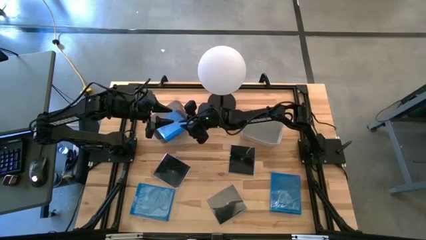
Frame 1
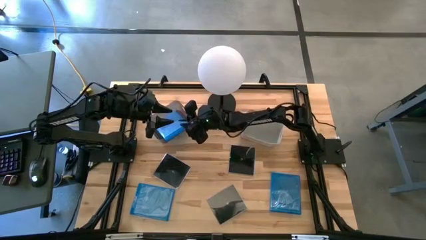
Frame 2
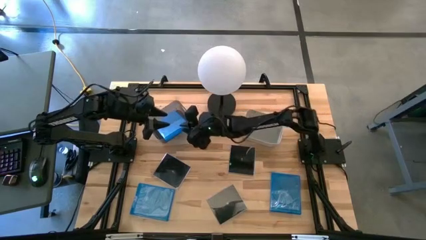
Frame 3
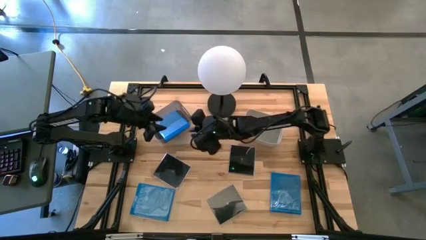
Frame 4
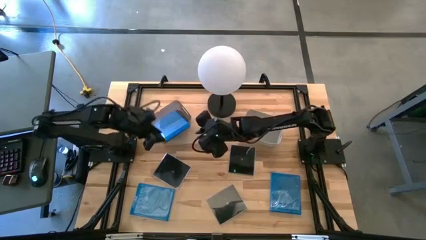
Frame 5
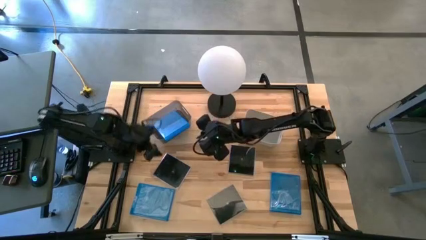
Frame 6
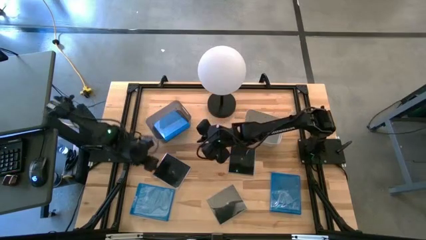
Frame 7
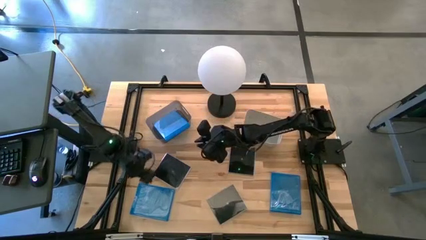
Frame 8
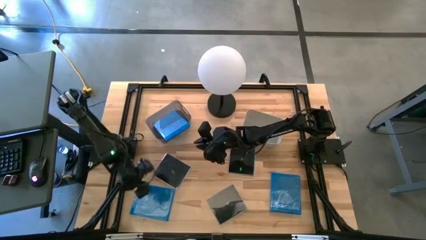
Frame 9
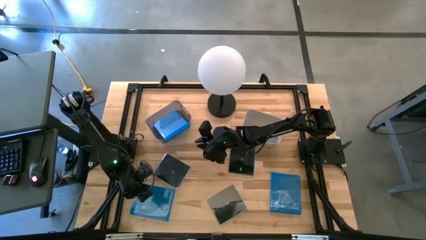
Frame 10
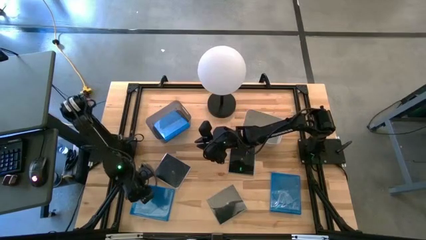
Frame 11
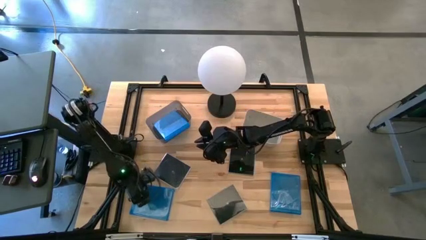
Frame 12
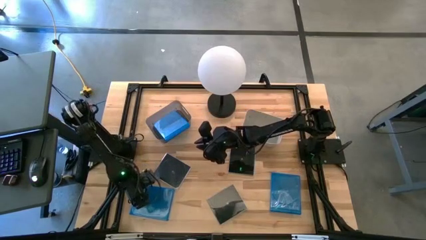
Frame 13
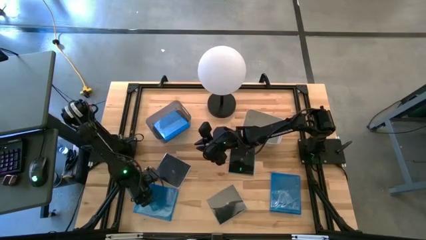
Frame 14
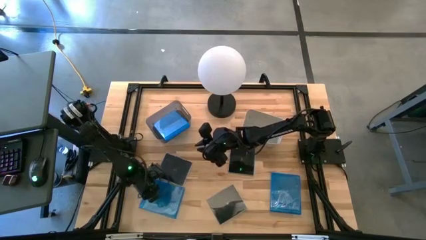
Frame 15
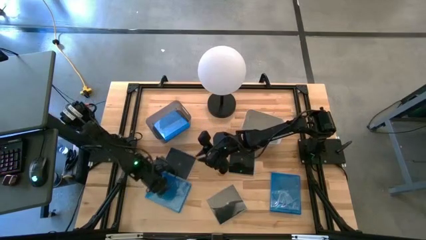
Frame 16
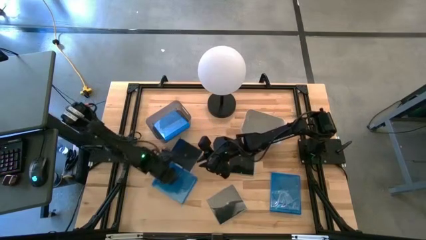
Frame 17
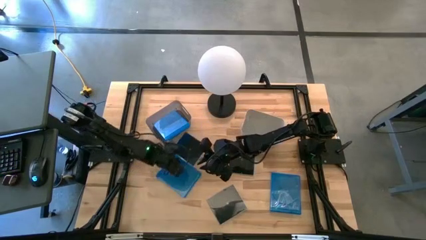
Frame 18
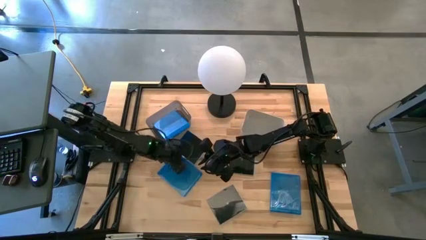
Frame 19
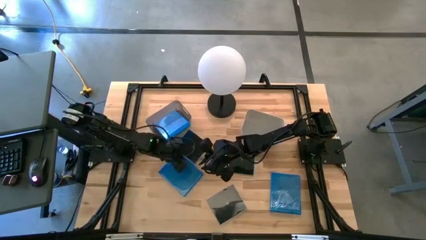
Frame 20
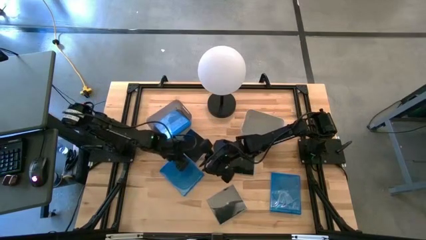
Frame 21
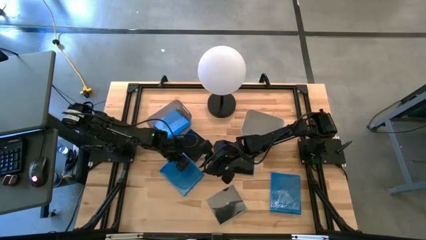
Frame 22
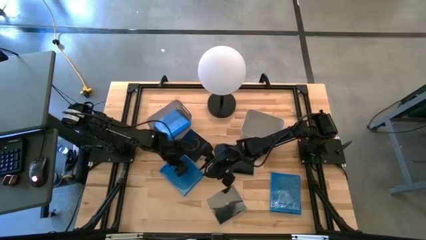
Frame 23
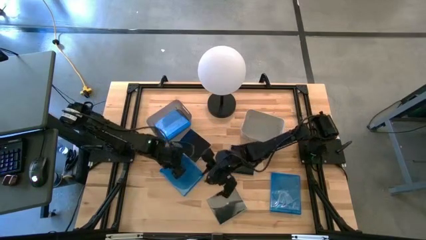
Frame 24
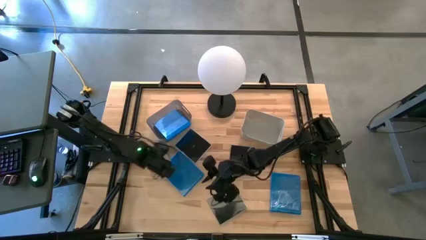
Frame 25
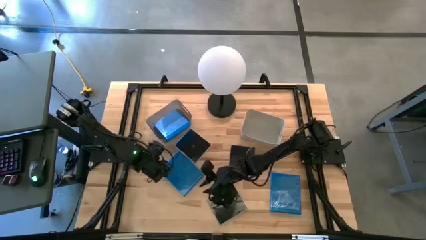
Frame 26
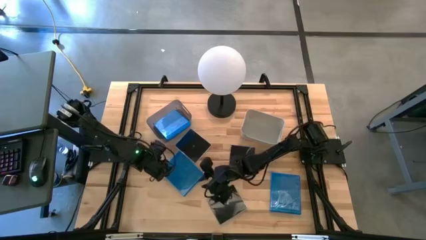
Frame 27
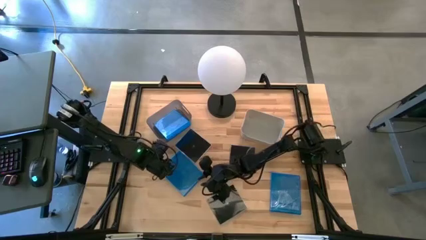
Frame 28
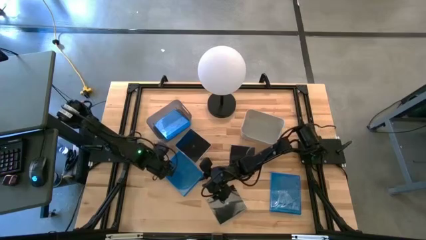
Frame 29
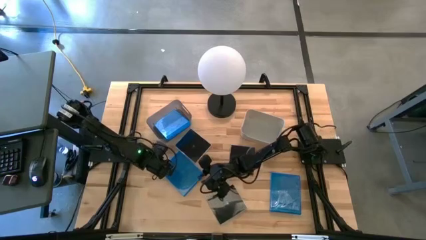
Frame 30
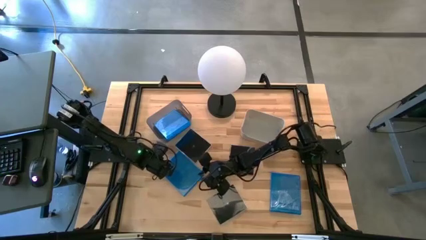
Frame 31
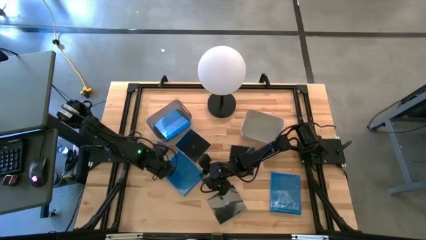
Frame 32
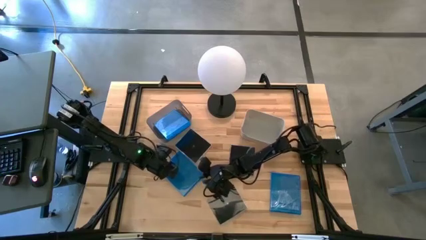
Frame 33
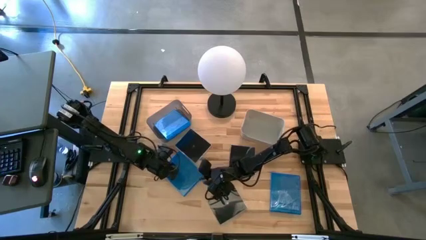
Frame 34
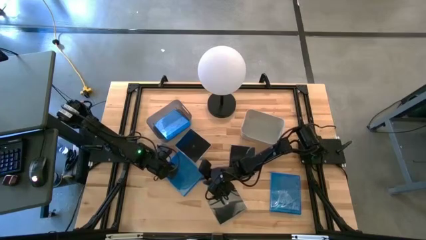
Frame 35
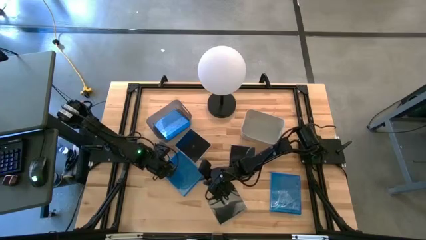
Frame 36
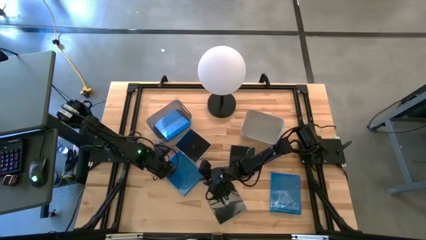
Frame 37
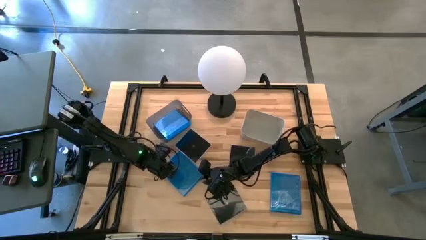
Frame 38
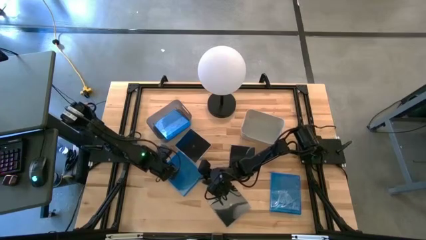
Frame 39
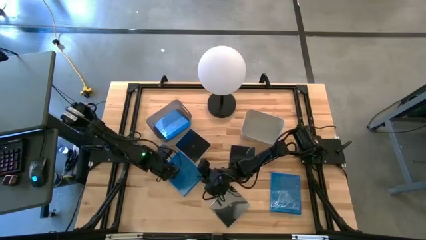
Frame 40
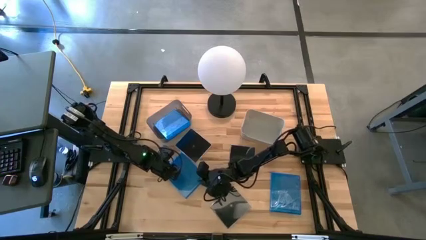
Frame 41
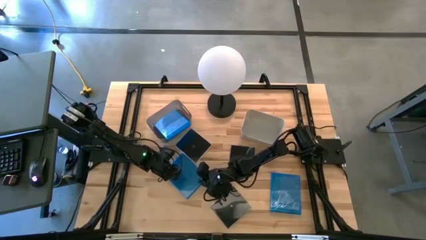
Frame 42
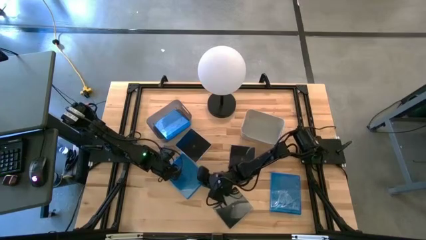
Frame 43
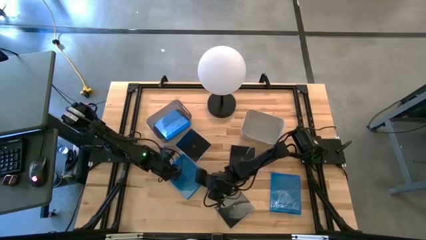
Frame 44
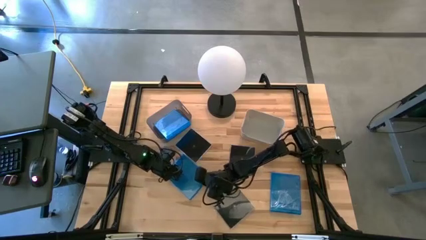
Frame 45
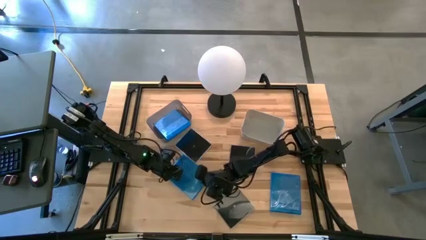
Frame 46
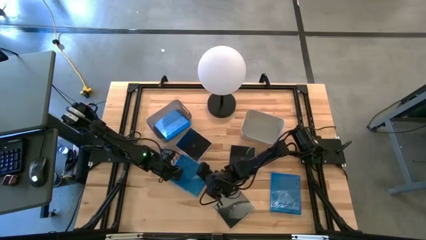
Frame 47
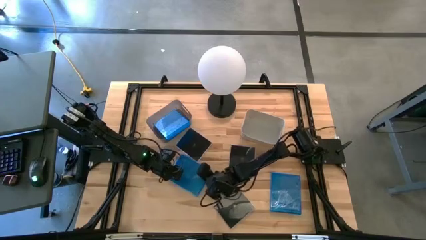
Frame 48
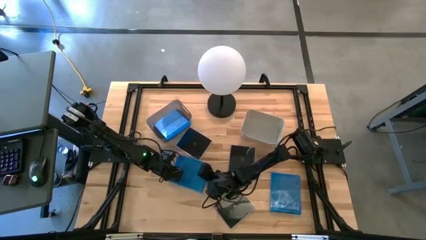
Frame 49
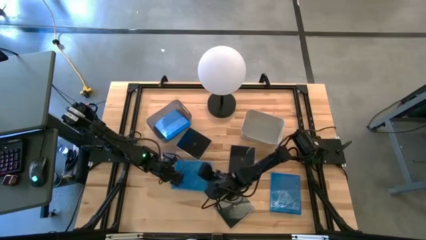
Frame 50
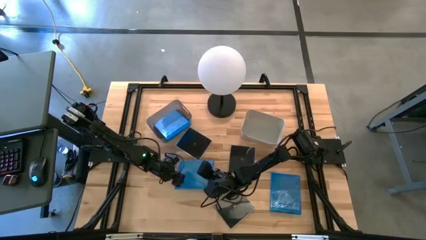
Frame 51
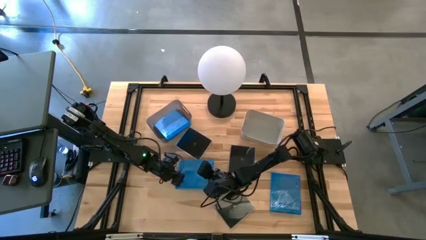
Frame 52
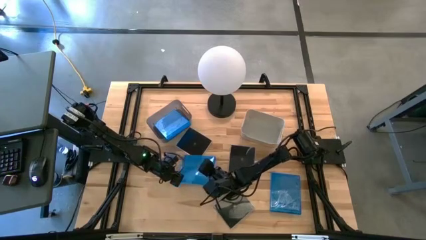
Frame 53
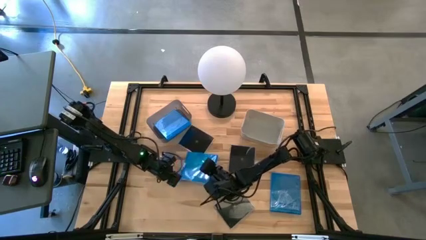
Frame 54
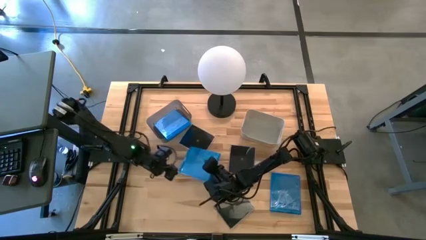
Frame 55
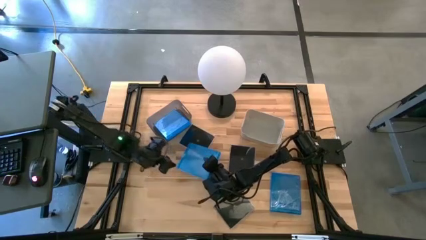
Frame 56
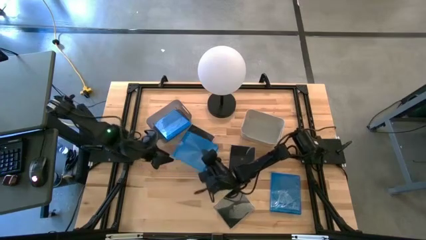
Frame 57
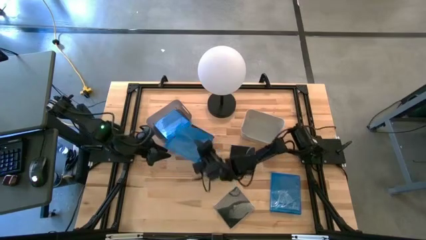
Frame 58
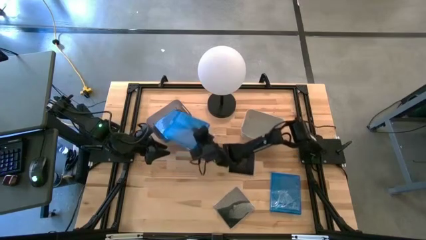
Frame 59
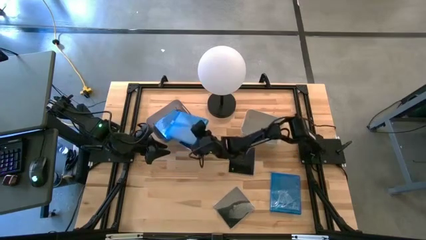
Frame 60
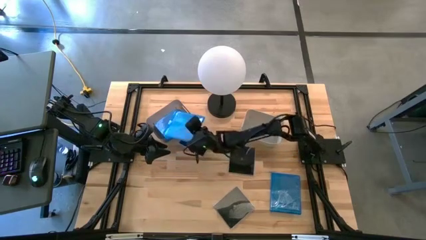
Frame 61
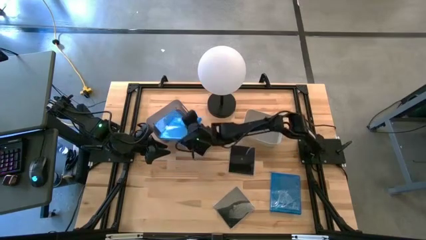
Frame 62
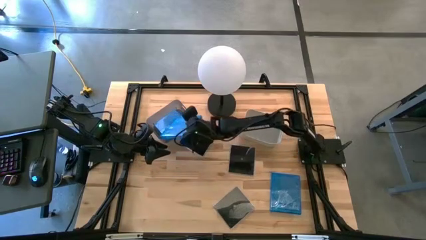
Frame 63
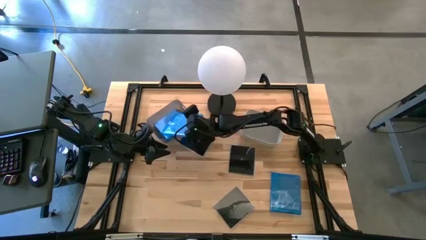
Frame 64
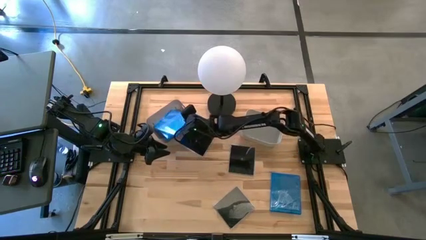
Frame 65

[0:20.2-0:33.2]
Task: Pick & place jewel cases by type
Put the left blue CD case into the black bin
